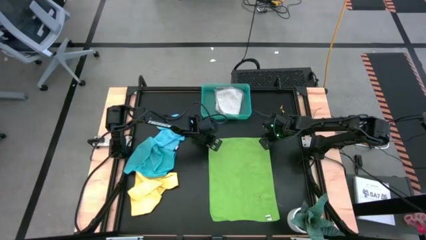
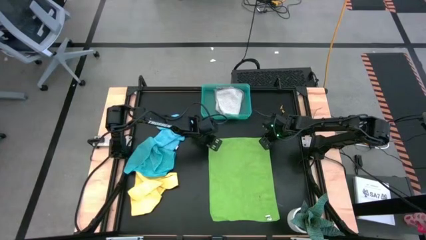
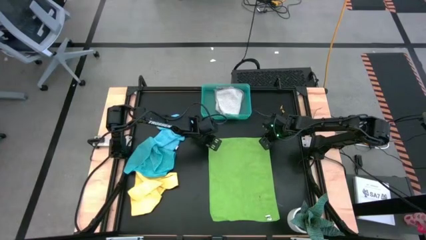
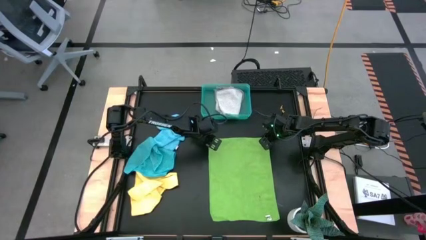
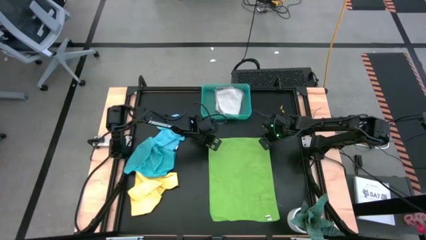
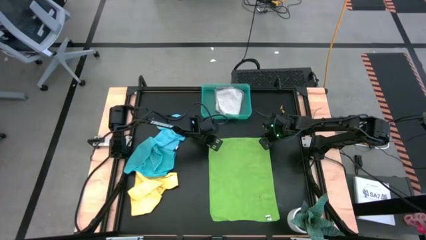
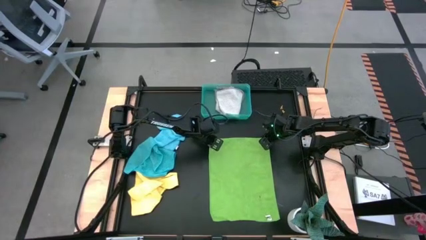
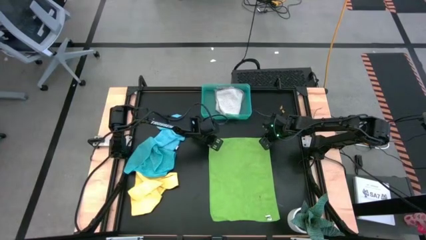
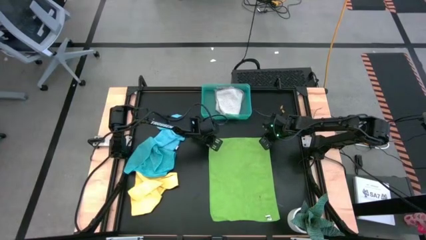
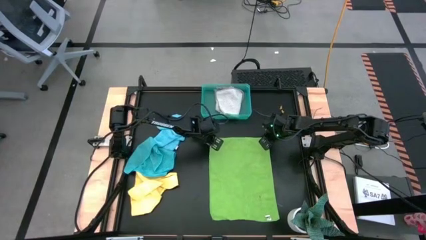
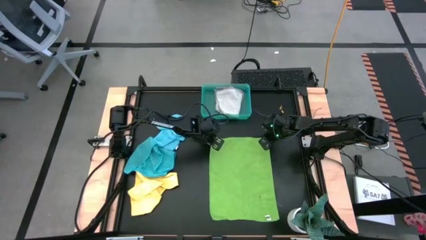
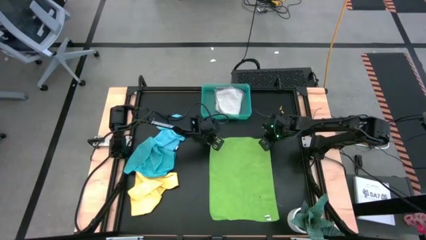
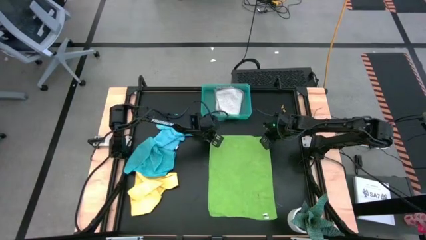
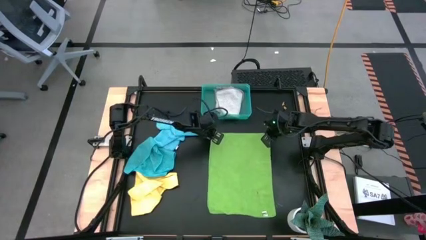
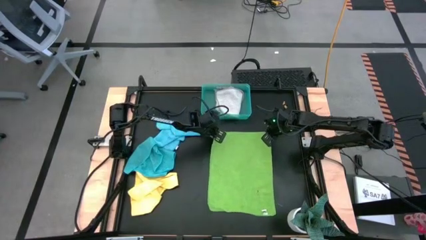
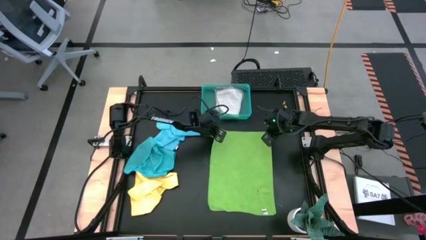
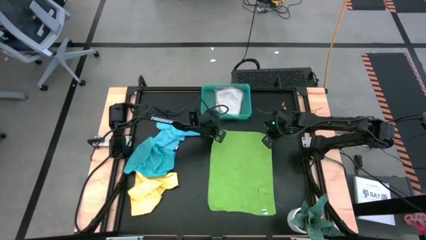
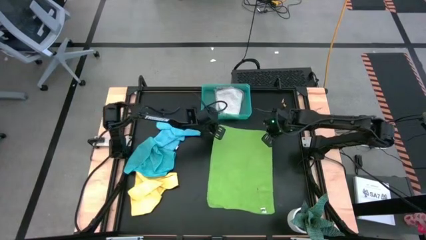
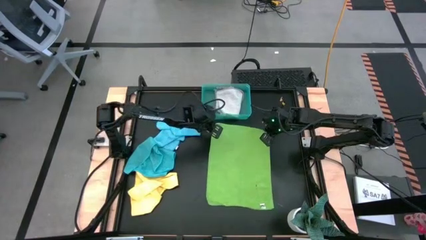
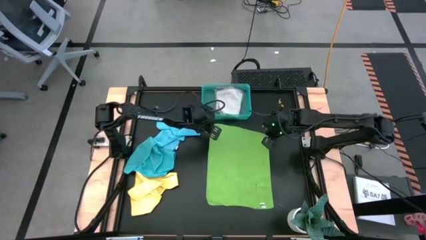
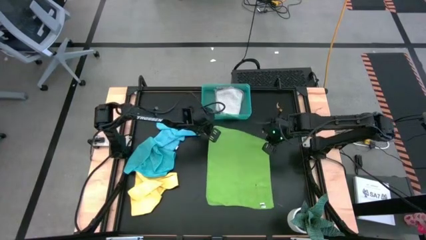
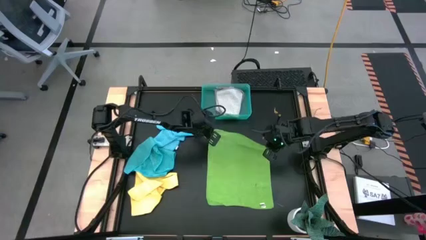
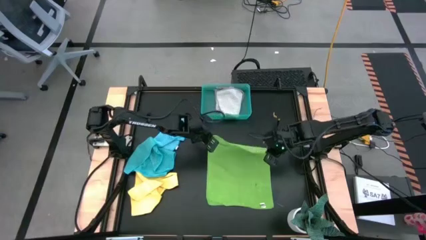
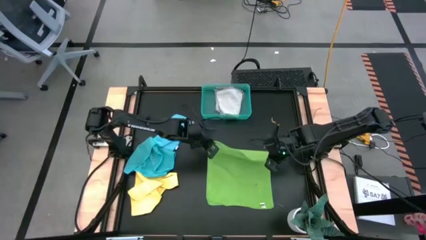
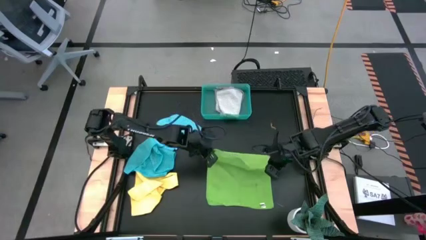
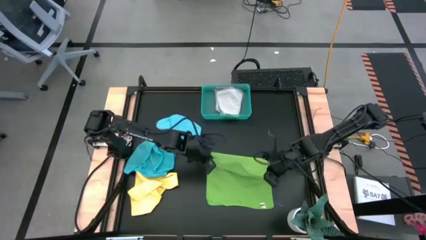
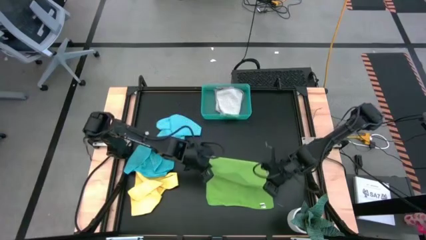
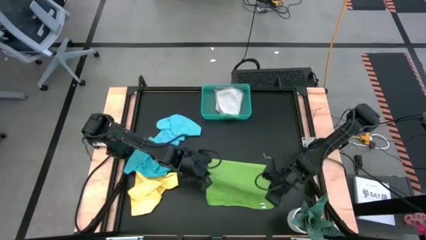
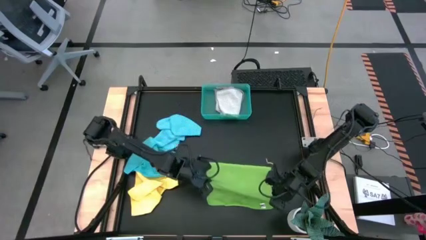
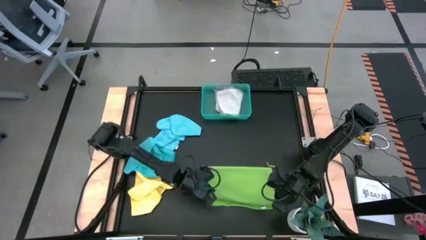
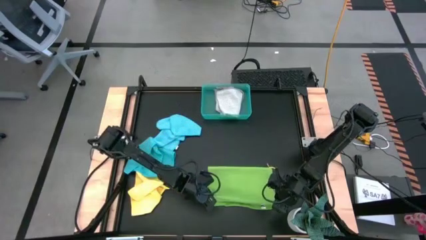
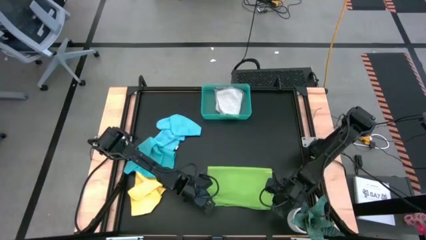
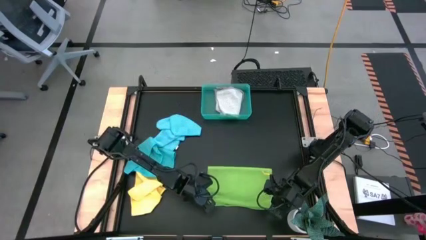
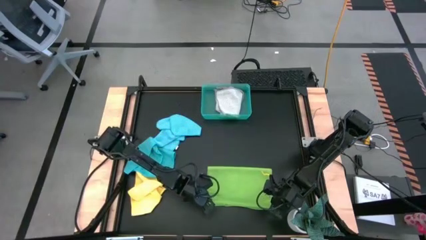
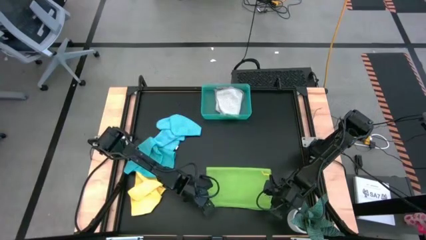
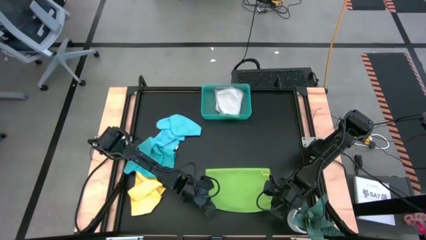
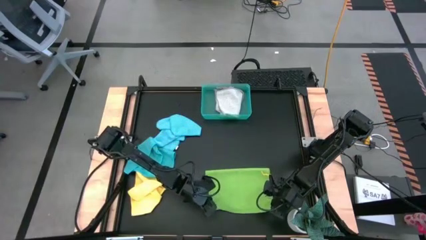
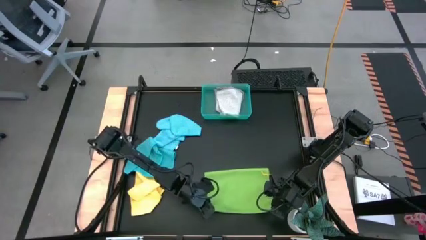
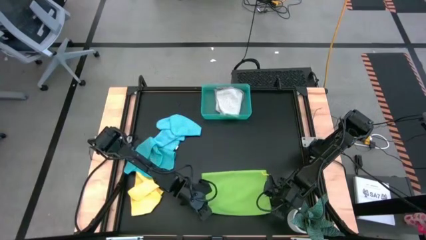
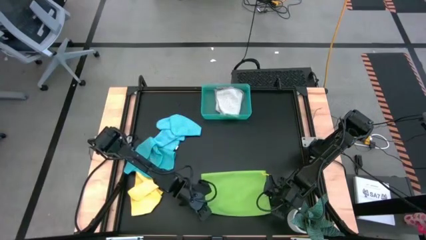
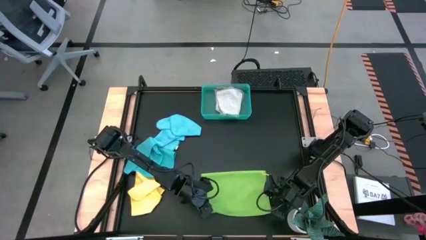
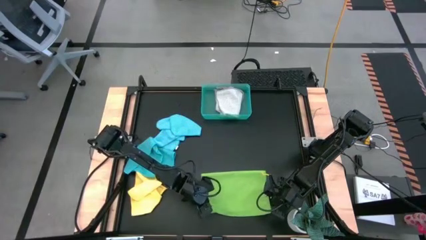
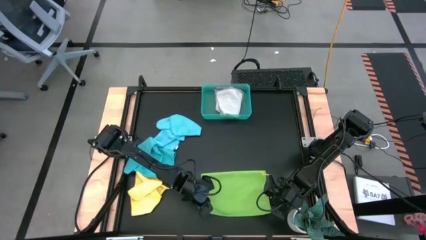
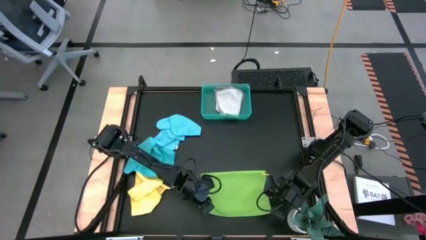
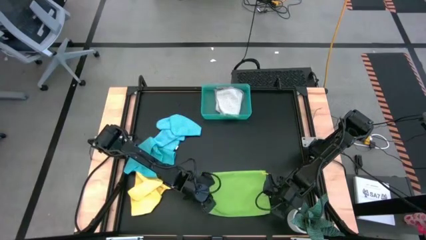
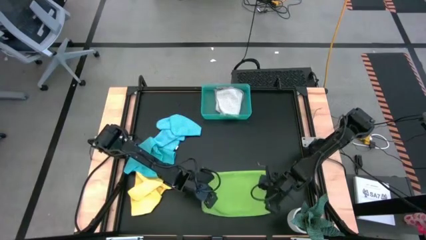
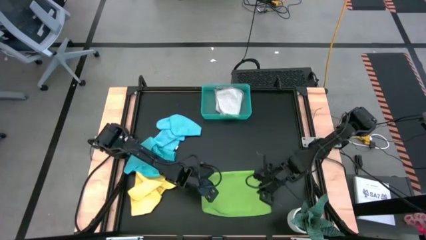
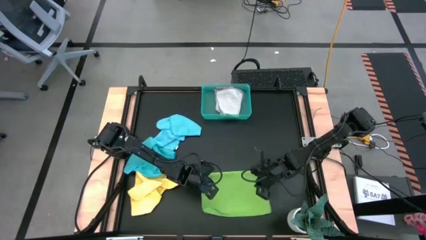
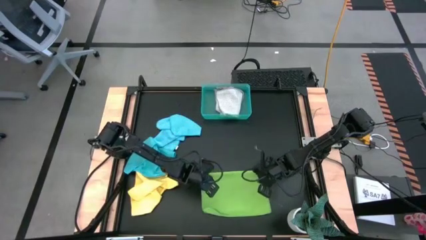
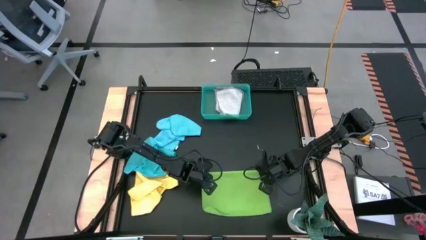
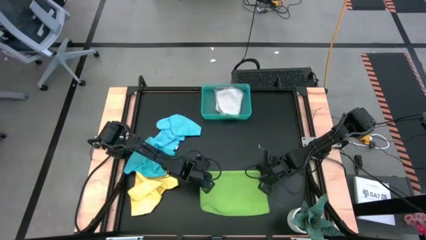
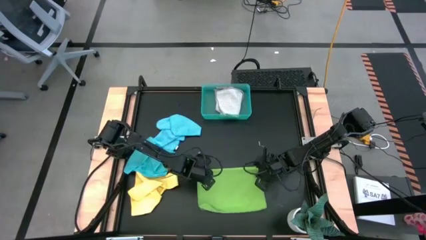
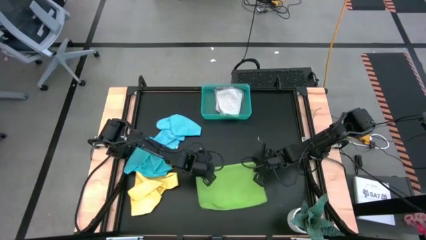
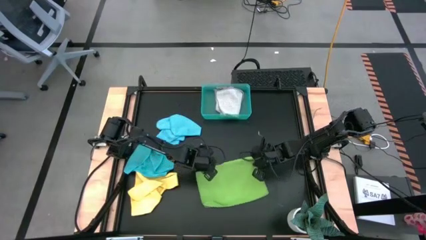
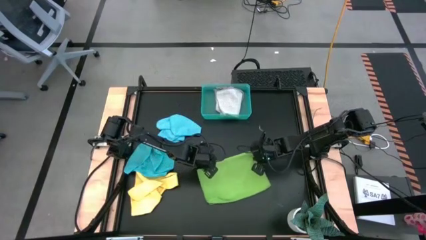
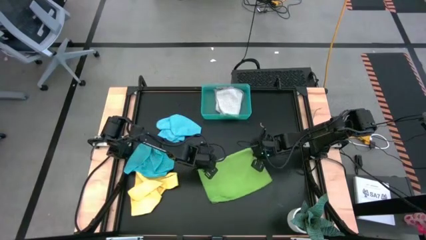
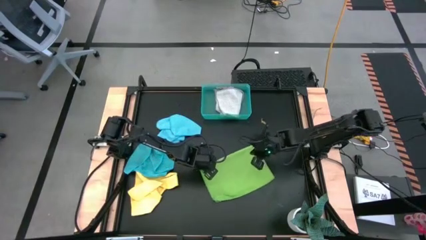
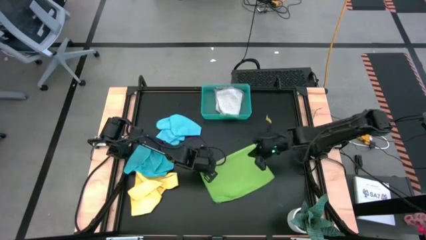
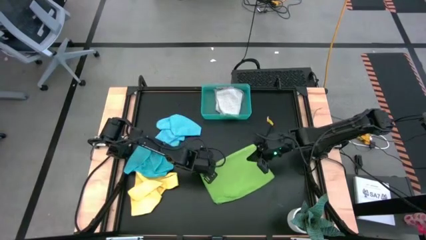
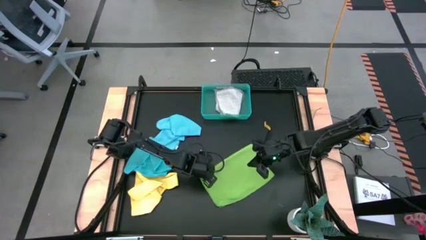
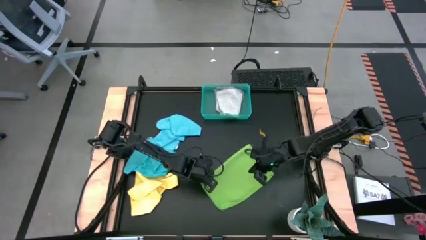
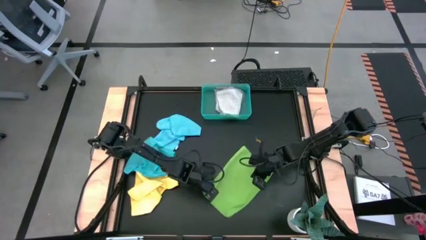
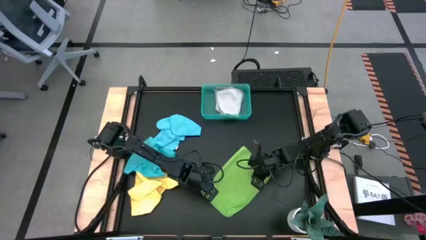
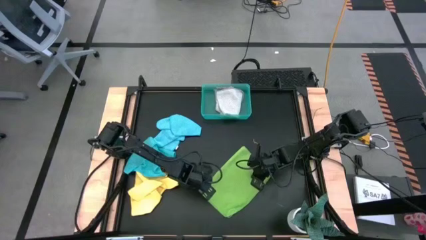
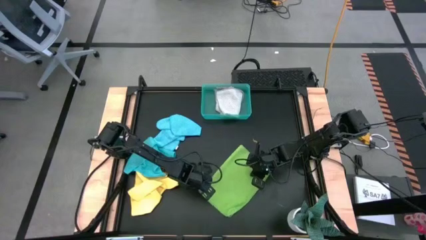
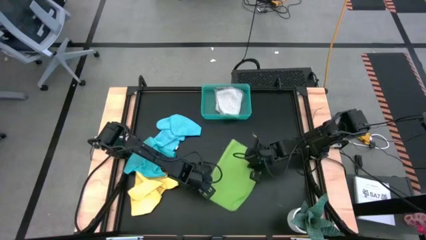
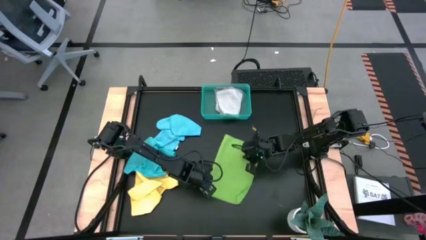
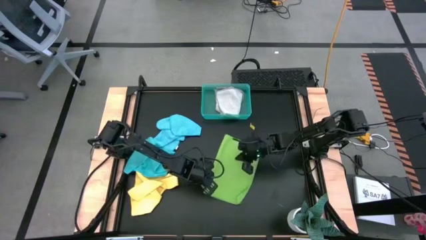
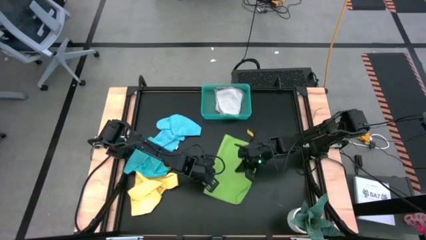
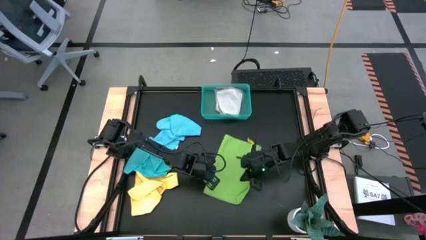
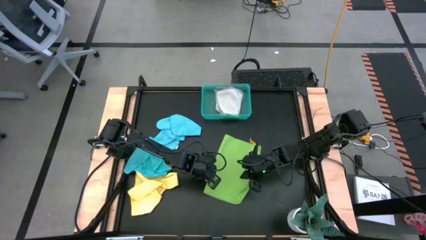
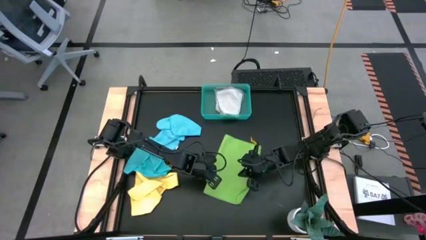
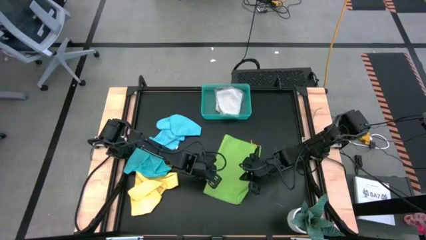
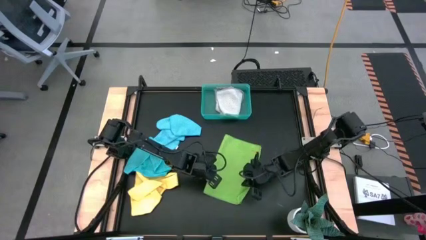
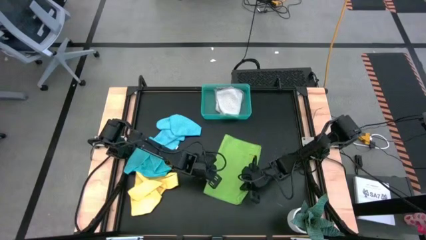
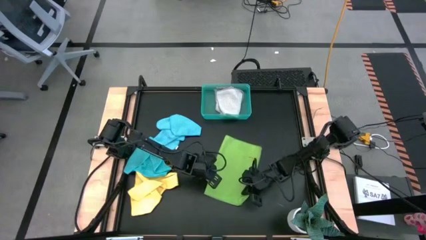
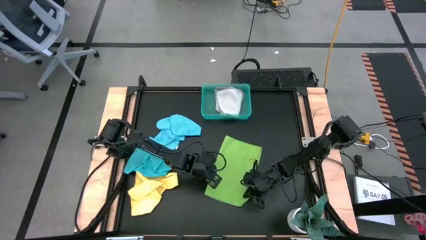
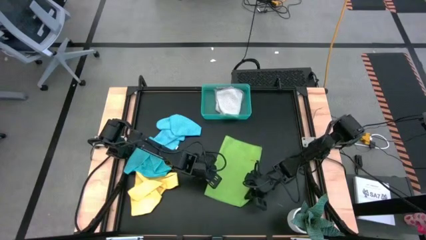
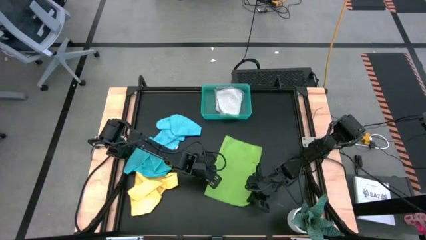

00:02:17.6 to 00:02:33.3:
Task: Fold microfiber towels
Fold the green microfiber towel
